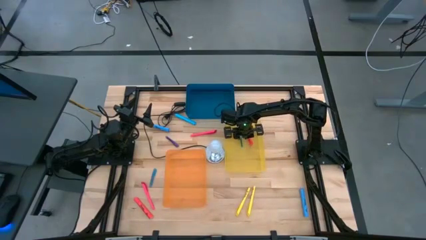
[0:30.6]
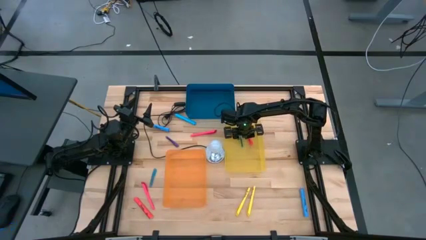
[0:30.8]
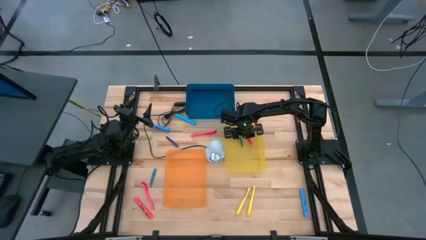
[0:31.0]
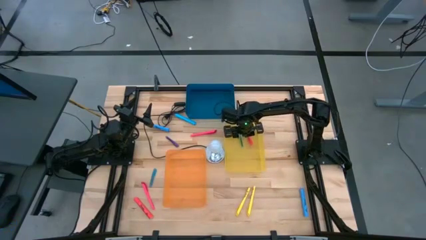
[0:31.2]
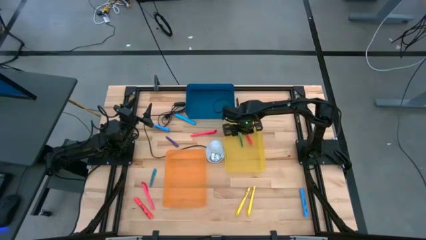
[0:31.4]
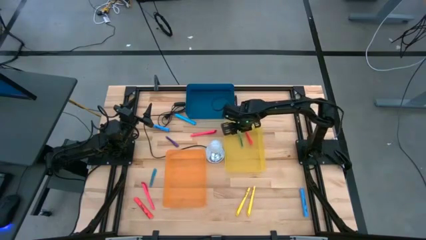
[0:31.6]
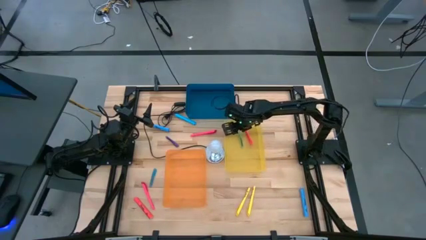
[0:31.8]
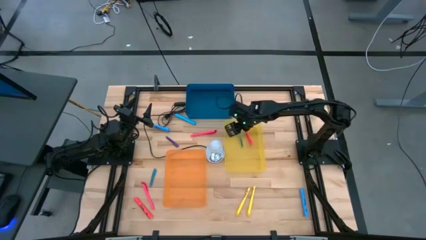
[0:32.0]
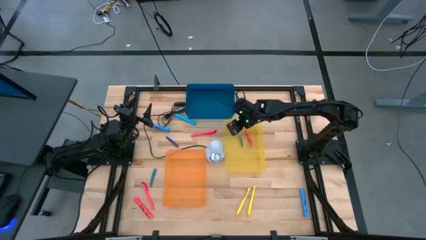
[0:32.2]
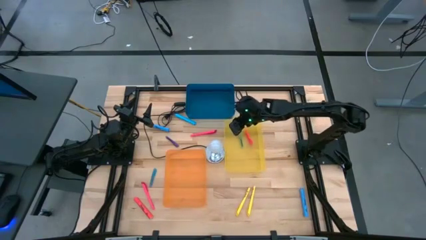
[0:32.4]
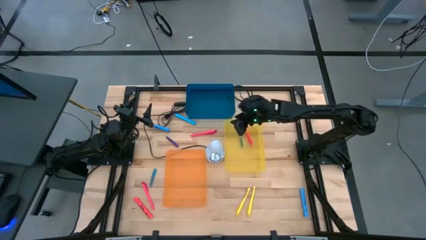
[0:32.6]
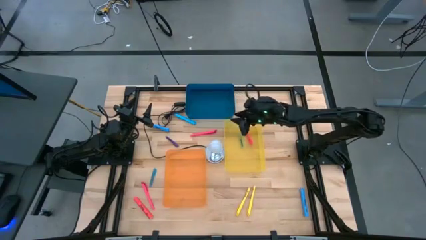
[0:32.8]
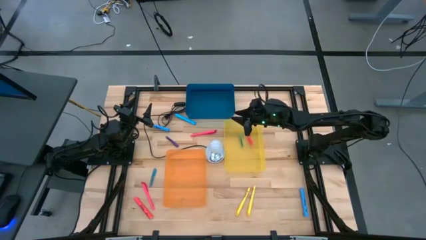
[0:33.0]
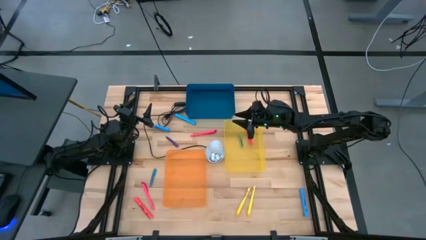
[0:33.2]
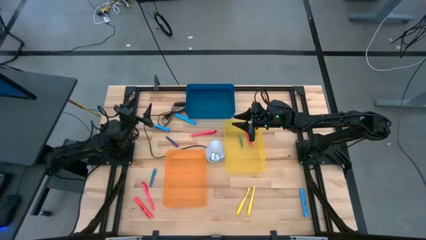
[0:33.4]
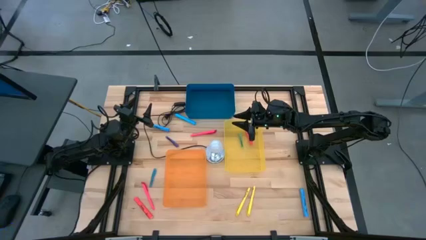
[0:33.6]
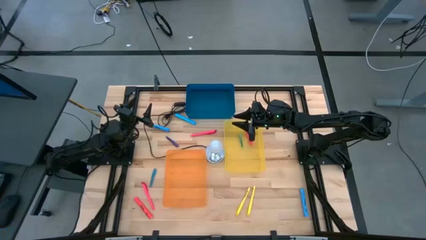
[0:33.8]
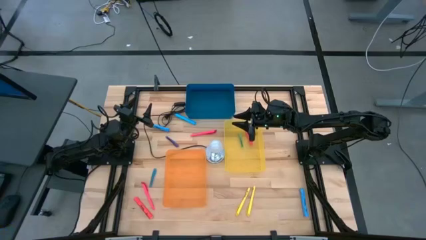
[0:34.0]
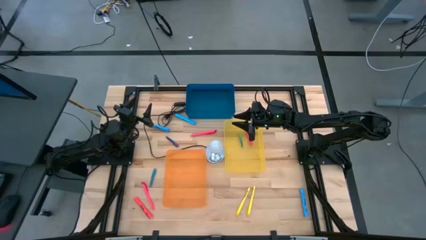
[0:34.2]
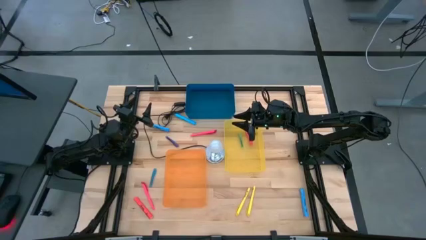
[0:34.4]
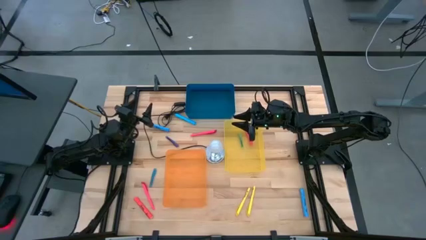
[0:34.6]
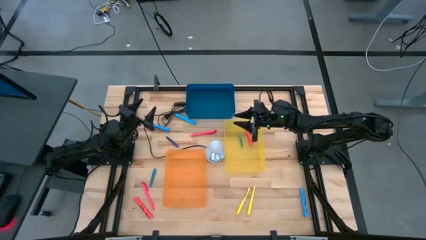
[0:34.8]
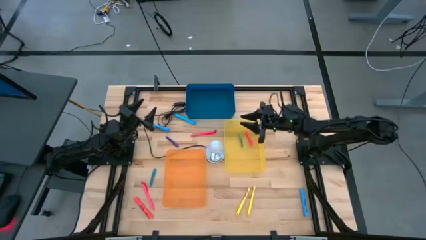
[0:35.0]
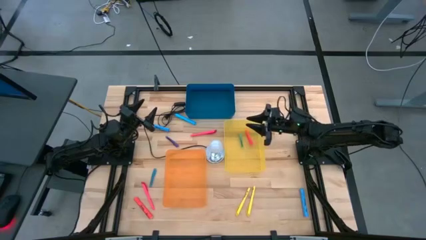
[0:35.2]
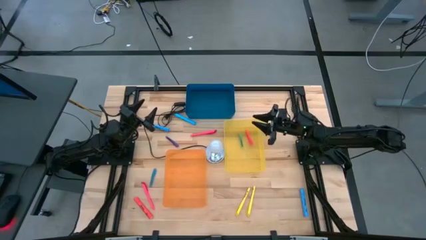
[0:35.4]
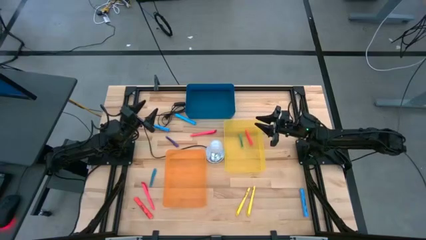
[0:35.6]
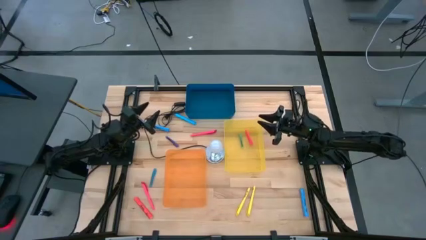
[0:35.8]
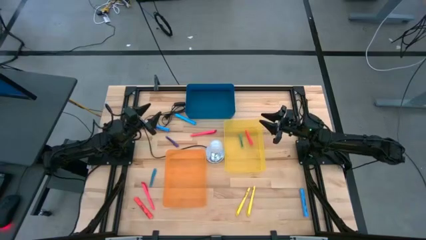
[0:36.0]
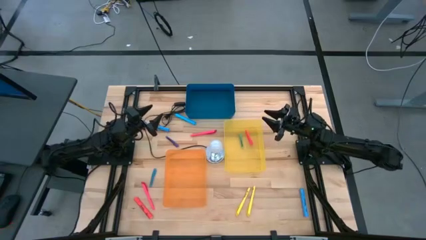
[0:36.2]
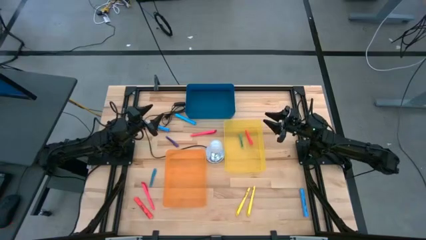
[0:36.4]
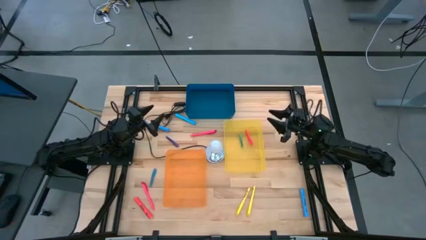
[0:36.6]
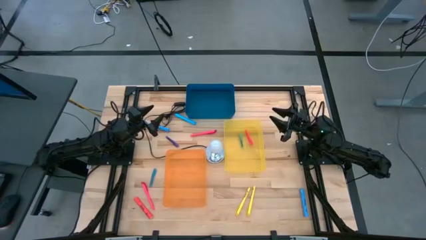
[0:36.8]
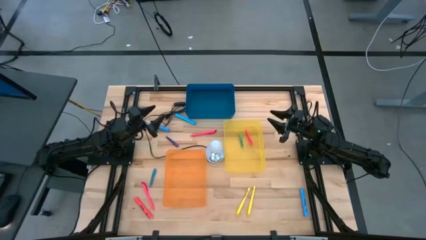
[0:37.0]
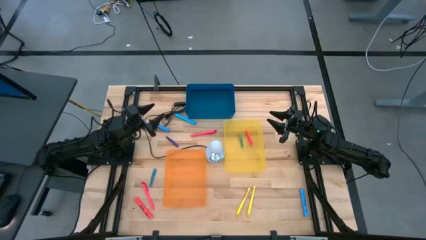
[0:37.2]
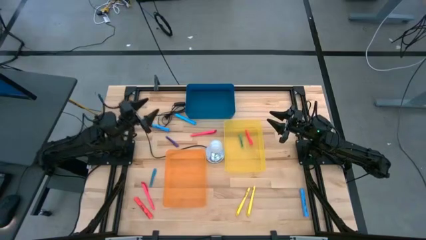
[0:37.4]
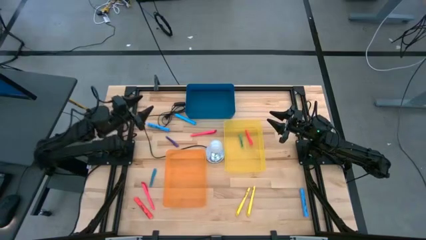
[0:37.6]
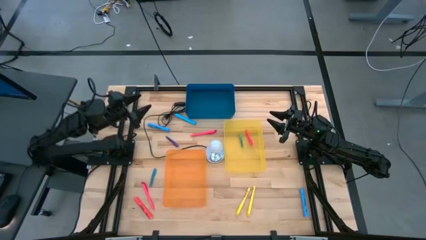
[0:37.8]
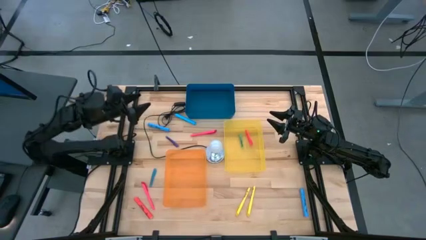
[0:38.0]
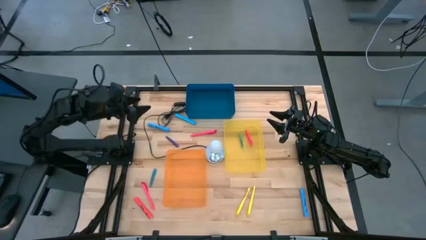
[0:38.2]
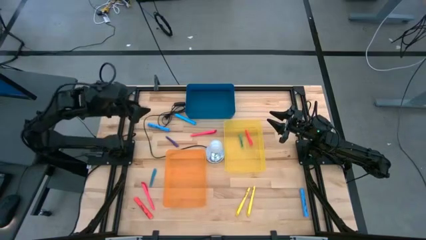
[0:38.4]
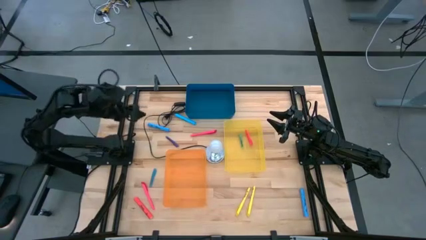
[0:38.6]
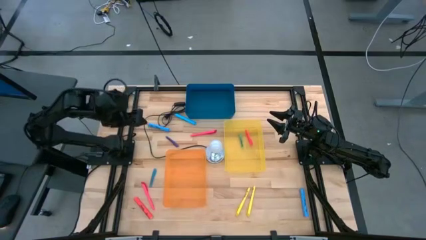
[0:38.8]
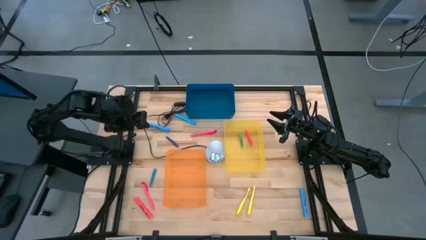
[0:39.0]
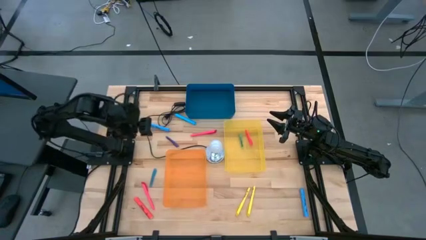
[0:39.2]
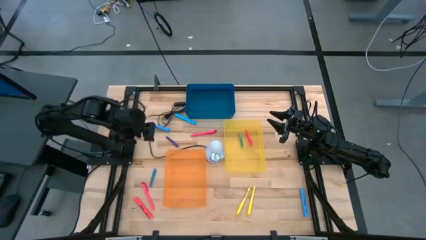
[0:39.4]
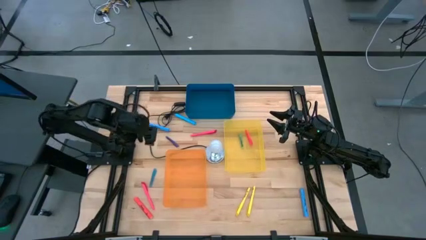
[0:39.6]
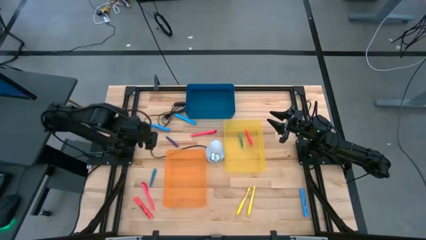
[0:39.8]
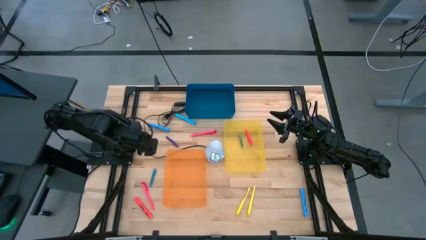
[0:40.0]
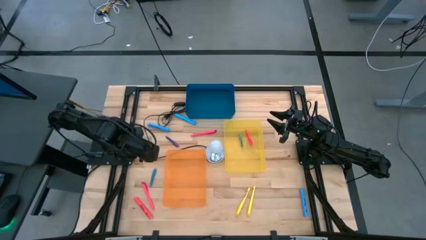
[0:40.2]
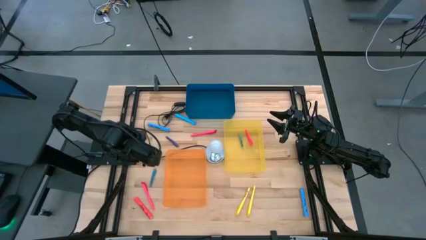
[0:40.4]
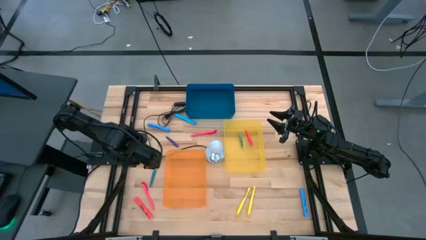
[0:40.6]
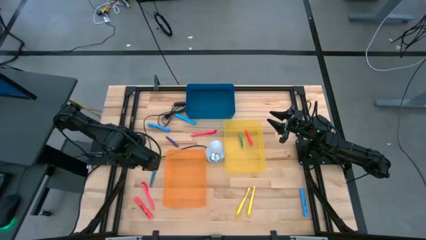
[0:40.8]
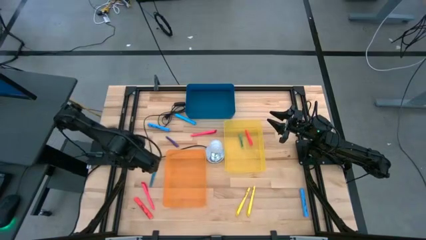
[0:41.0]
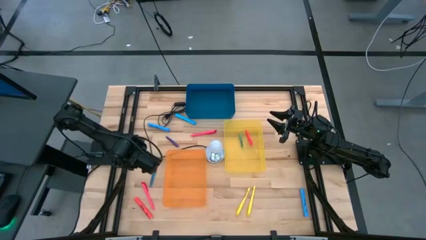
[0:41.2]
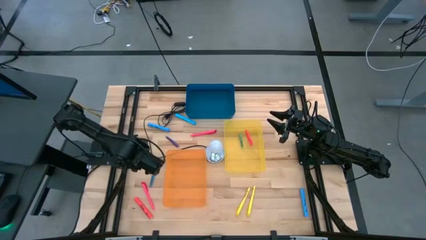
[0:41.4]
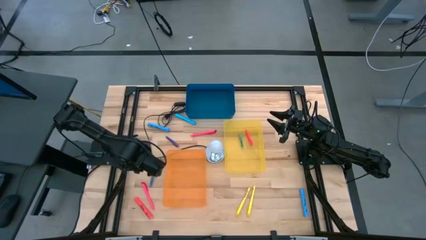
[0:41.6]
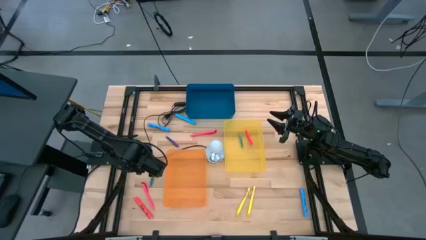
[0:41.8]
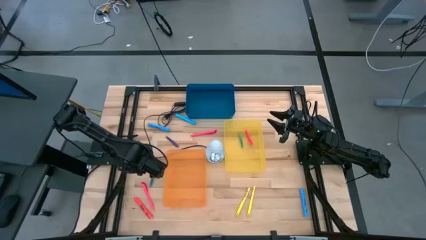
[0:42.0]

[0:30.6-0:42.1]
Task: Pick & Place Markers
Put the small blue pen into the yellow bin
